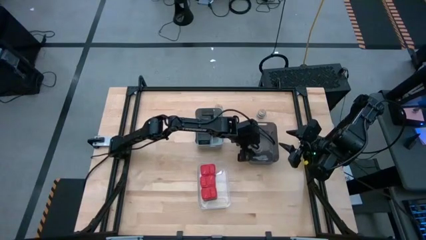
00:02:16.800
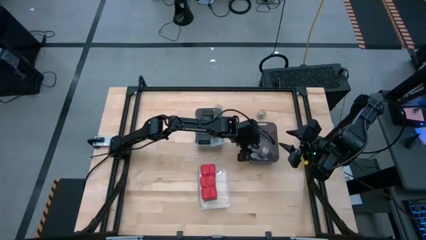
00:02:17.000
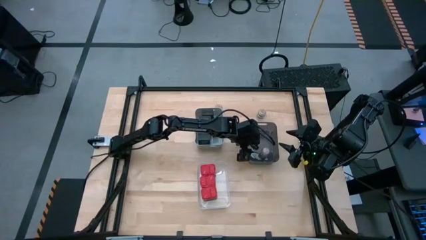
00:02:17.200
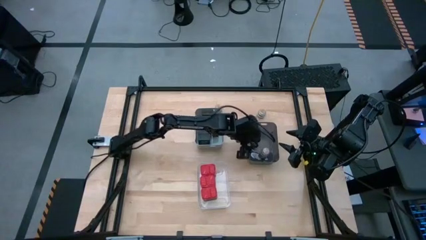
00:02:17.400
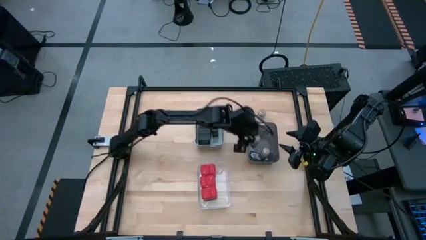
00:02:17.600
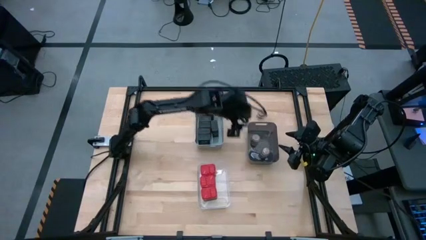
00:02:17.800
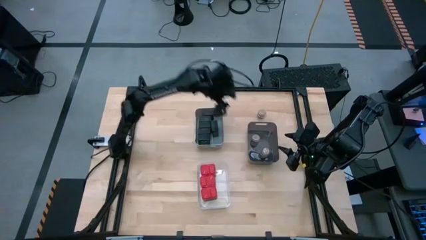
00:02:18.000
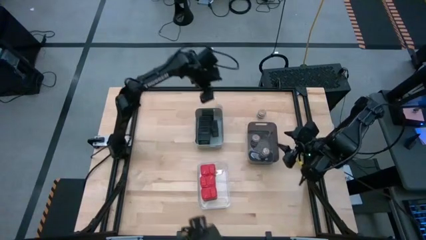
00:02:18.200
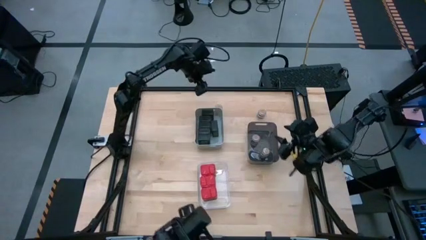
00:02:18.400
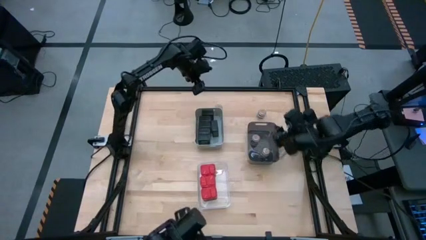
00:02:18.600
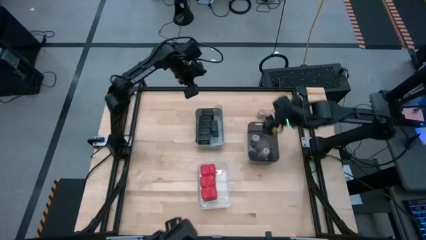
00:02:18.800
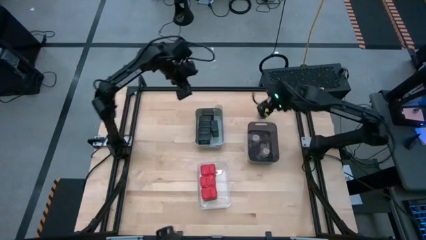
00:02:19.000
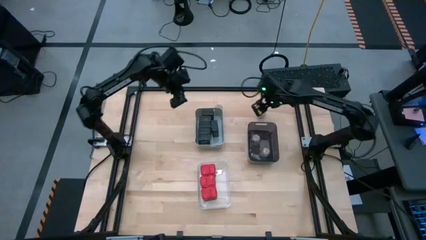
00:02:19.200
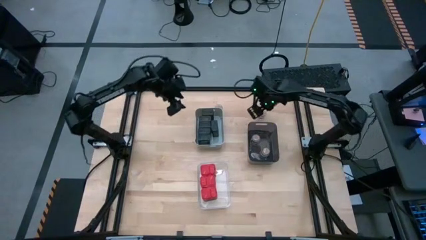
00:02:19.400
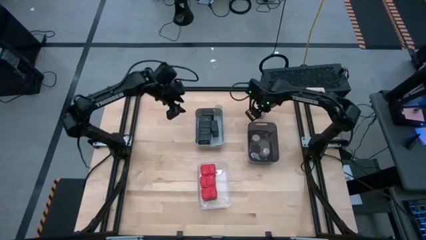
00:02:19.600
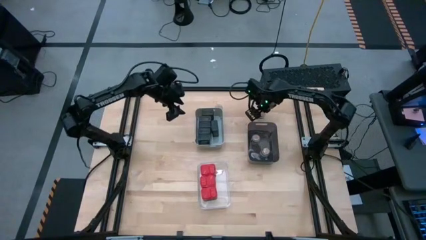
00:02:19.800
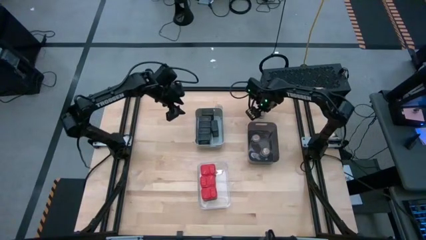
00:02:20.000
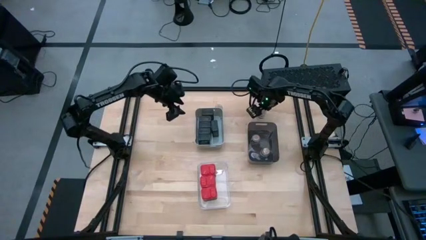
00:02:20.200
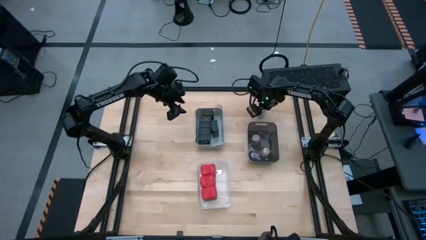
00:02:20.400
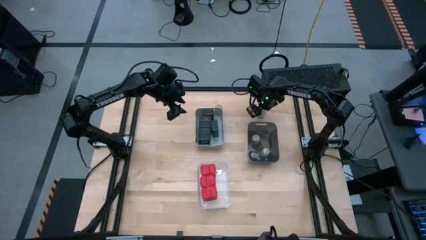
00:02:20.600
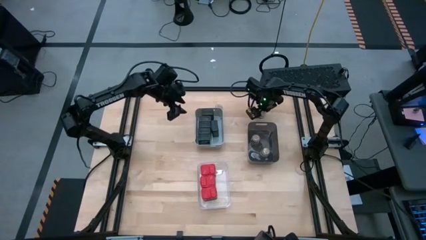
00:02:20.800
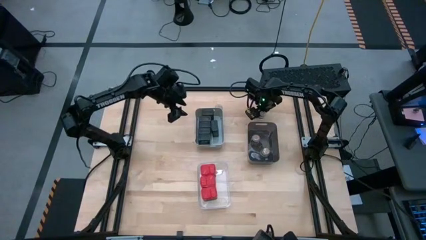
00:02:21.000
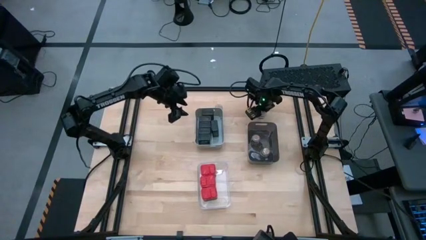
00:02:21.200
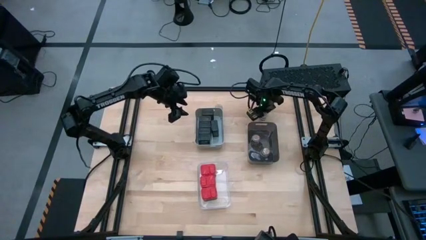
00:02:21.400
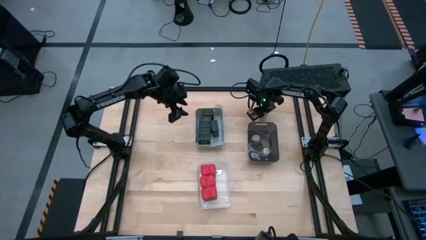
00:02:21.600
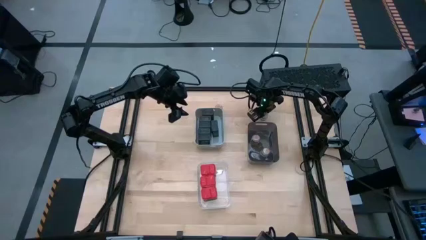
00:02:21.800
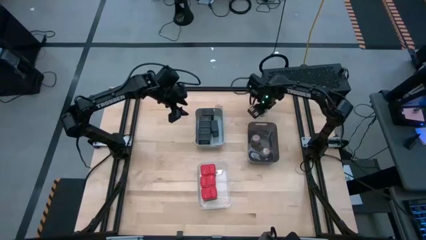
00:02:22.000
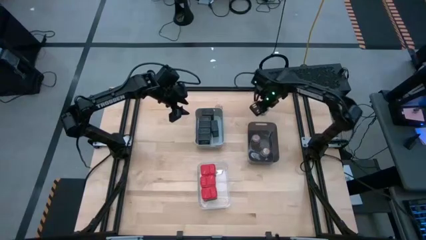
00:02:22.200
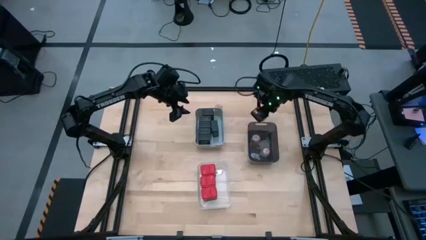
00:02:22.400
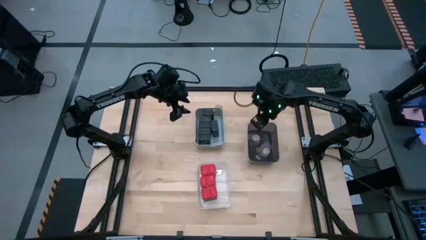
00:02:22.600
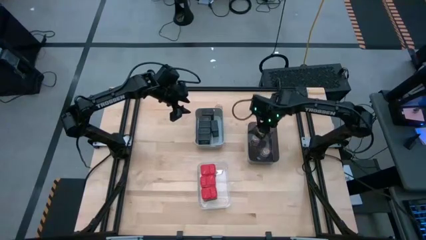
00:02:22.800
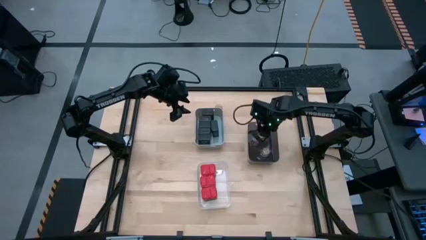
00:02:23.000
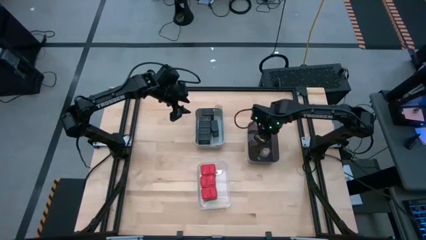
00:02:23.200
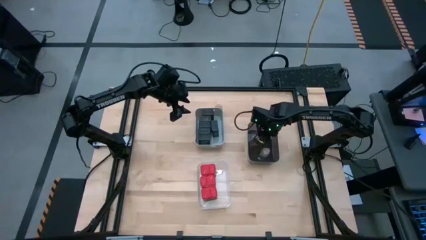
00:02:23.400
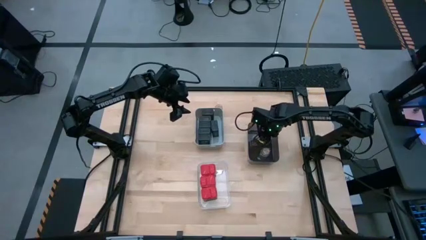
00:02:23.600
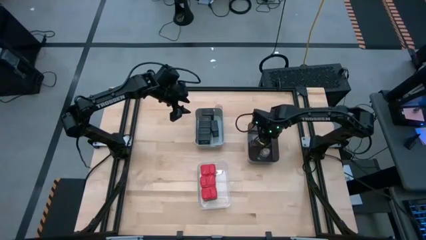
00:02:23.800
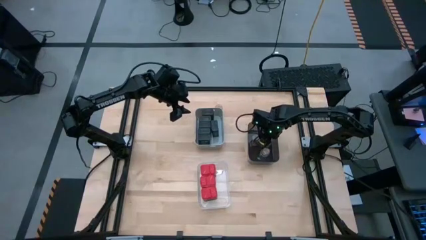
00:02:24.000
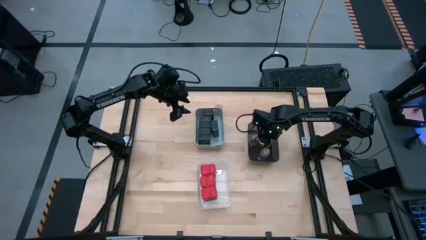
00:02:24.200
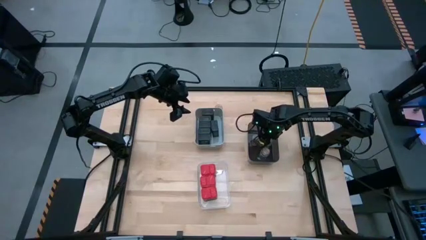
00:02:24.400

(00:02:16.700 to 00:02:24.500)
Task: Sort spices by type
Put the brown spice bottle into the black bin

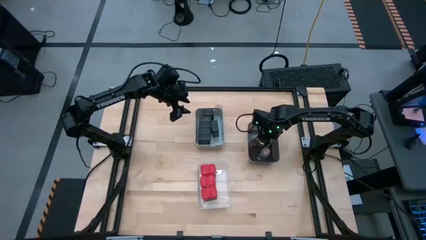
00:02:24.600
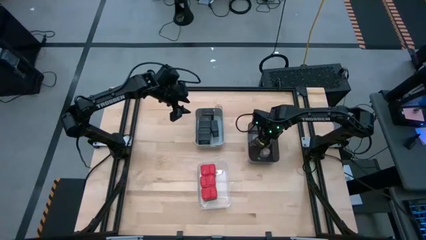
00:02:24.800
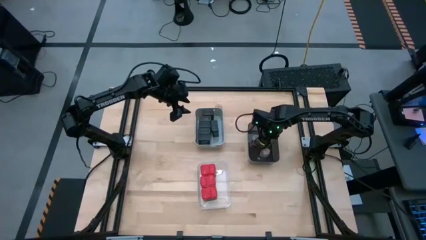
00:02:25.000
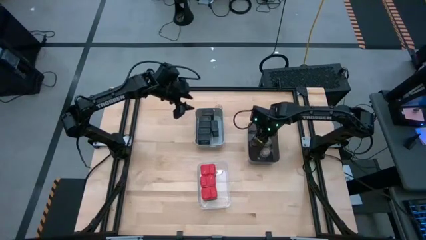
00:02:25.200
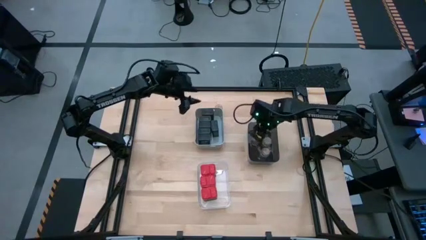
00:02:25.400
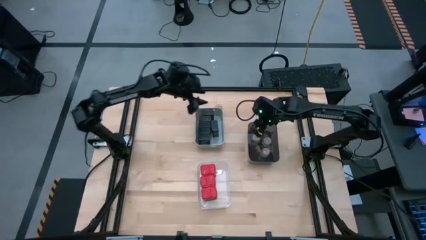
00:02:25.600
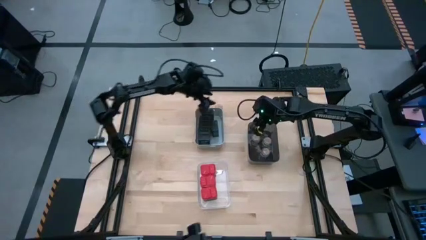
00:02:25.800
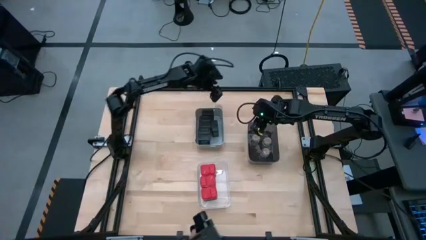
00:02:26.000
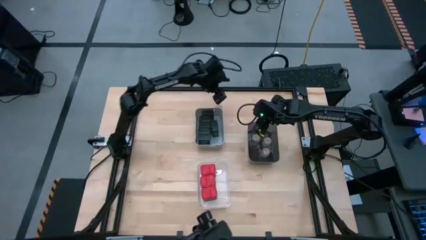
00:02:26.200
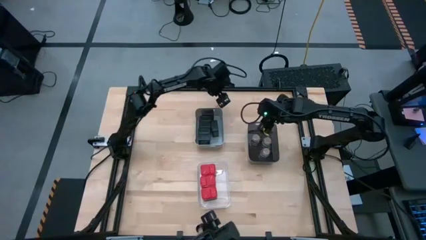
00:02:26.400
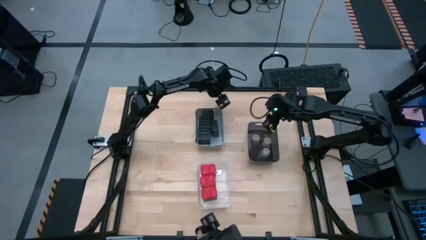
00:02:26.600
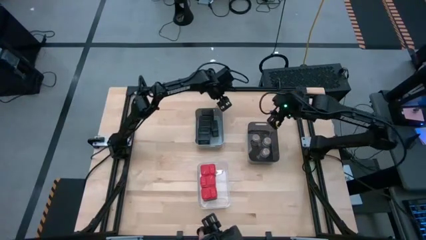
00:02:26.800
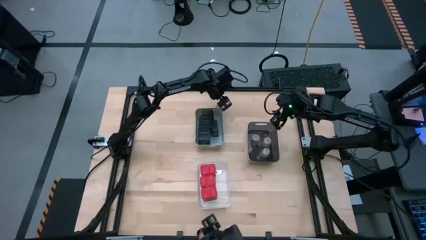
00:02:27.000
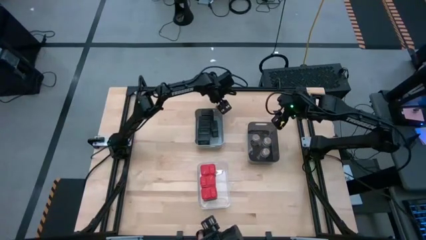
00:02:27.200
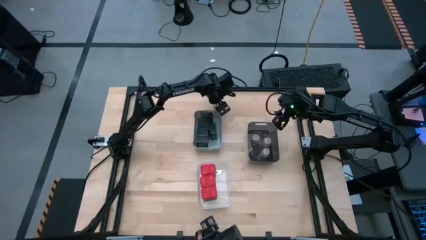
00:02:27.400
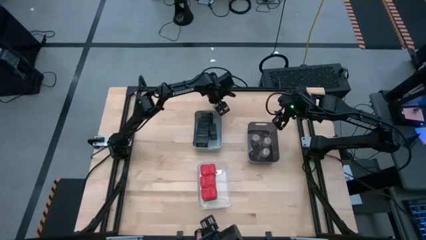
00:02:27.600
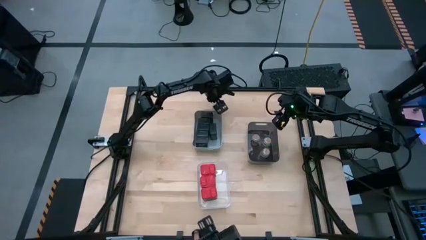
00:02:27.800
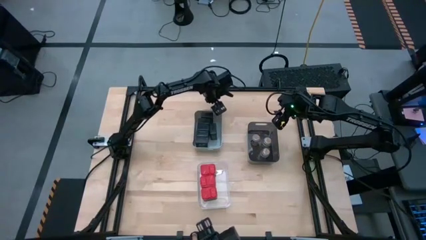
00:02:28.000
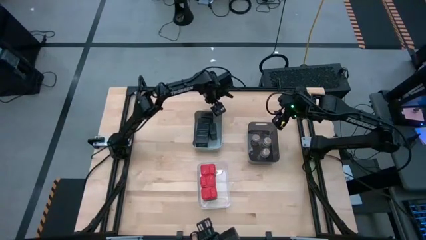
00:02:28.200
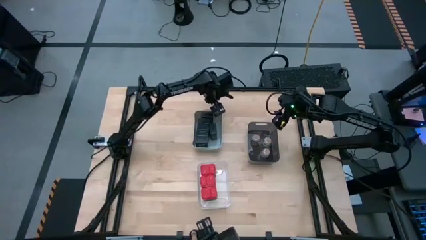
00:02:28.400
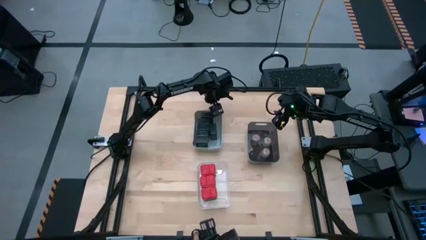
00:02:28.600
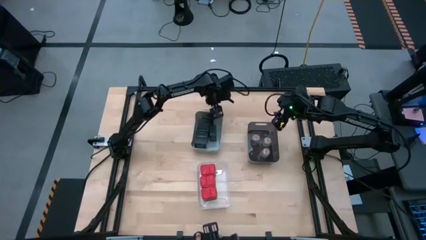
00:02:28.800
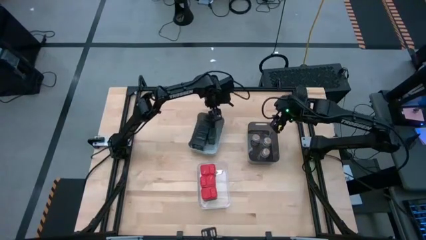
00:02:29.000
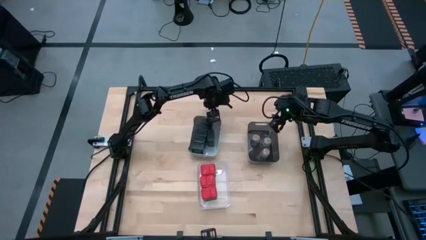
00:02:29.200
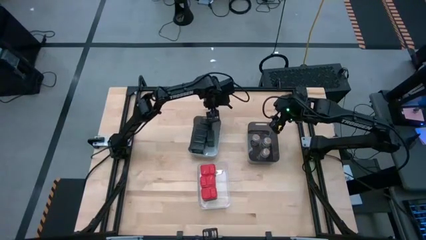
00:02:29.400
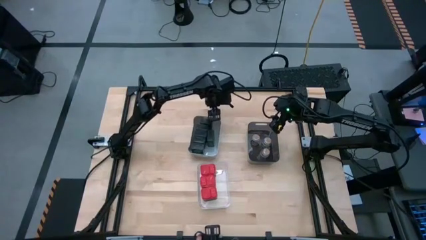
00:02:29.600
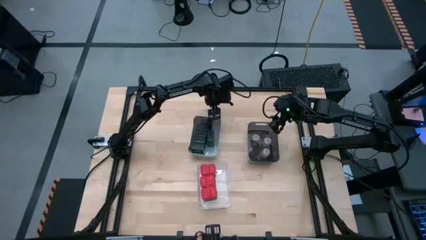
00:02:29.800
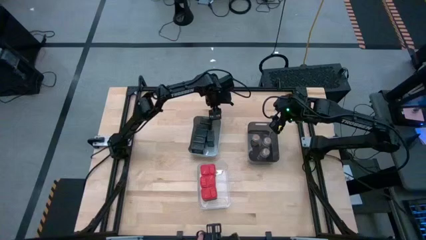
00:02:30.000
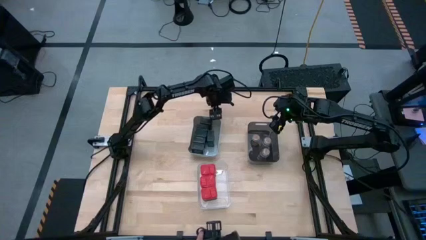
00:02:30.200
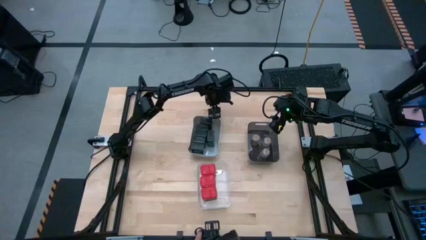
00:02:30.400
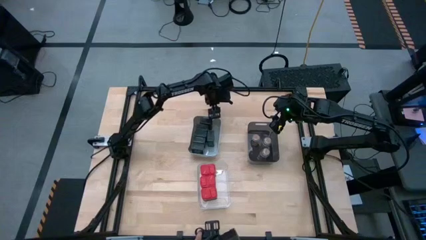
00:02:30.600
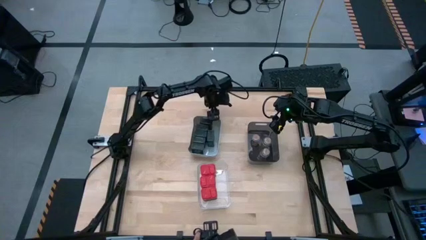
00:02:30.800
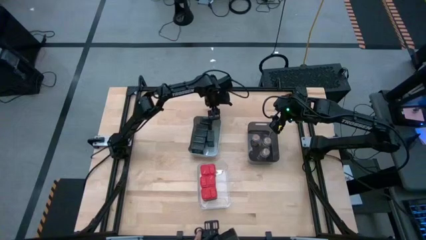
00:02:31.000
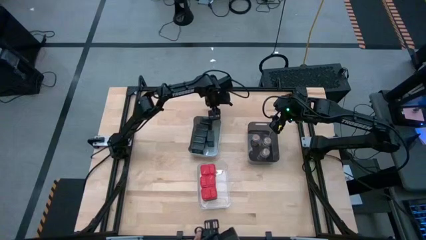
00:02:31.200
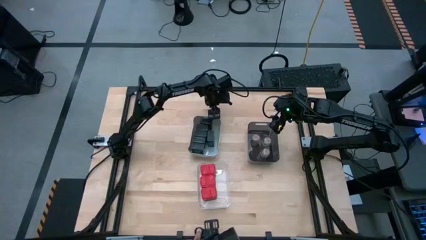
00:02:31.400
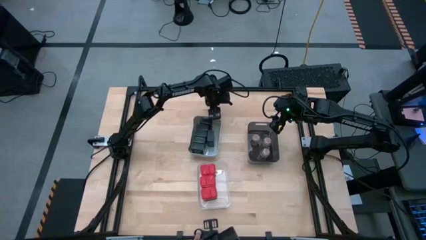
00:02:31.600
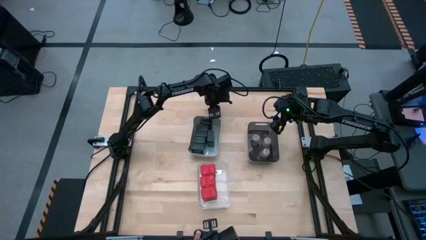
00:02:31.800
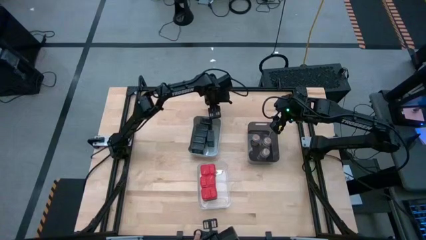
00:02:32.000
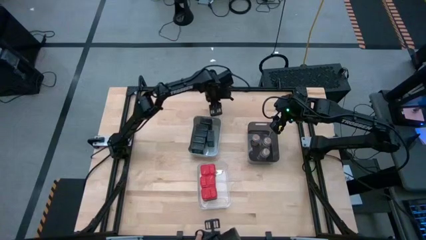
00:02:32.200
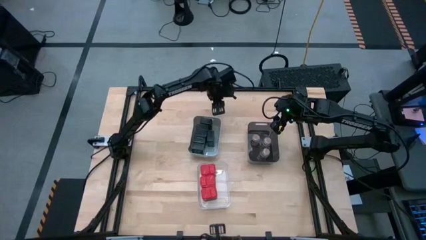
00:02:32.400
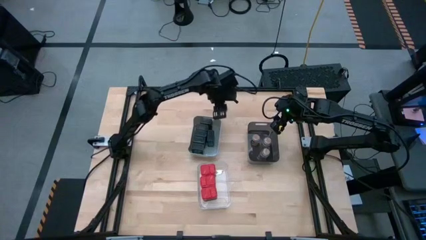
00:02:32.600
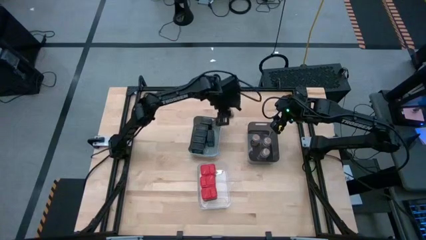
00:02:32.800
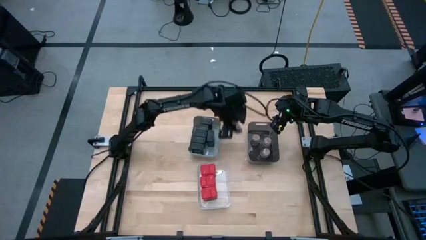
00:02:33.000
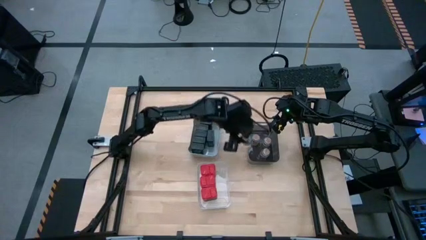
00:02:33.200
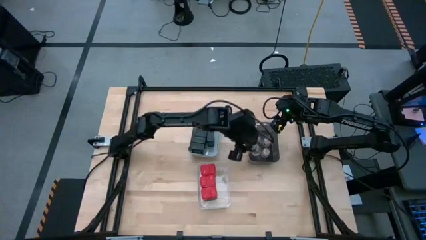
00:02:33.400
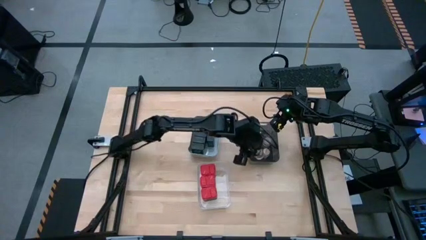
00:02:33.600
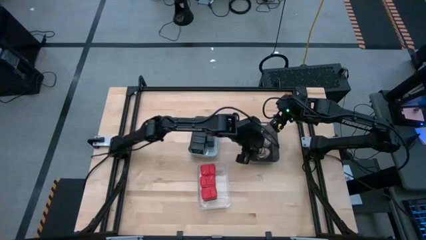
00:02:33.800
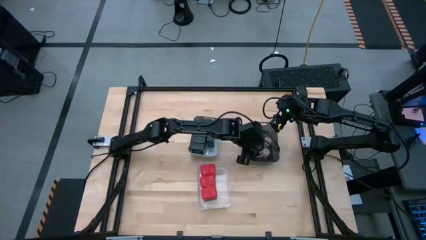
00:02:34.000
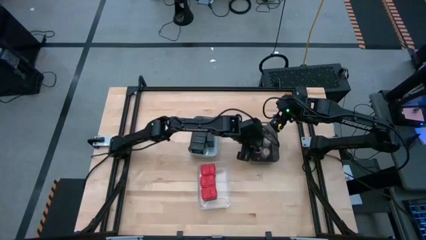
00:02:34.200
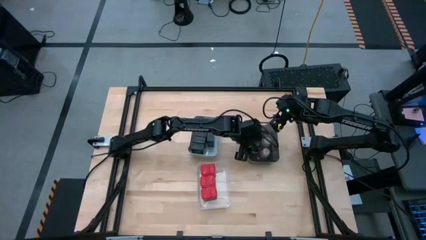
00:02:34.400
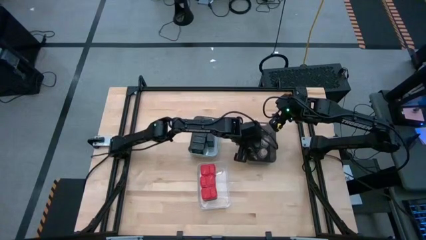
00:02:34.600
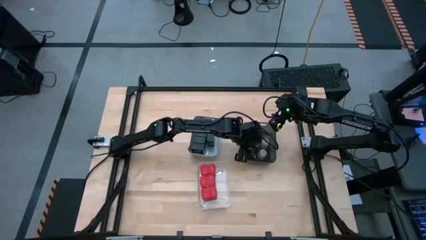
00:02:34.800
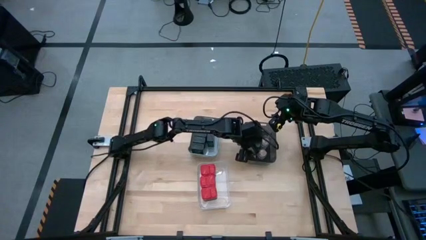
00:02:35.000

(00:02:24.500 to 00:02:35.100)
Put the brown spice bottle into the black bin
